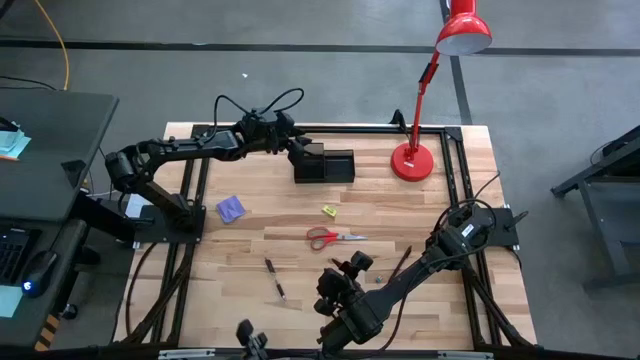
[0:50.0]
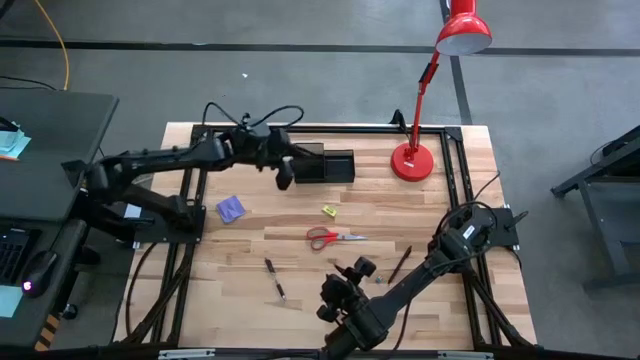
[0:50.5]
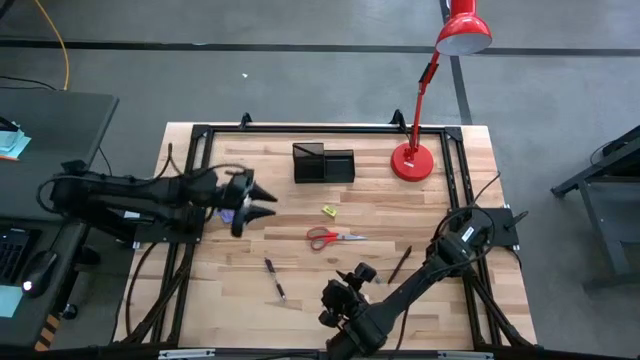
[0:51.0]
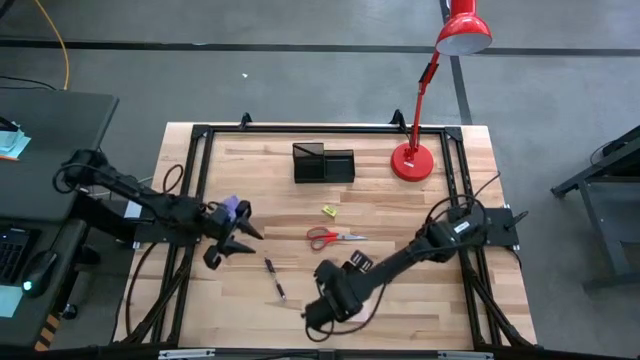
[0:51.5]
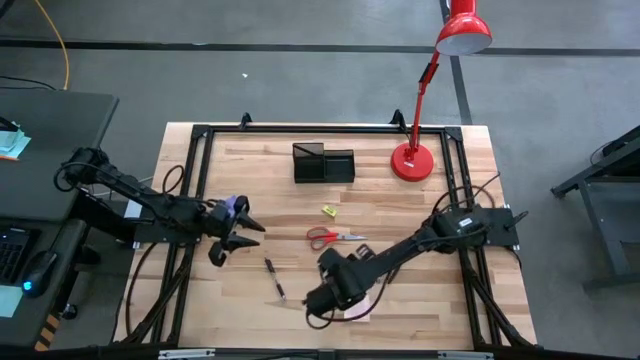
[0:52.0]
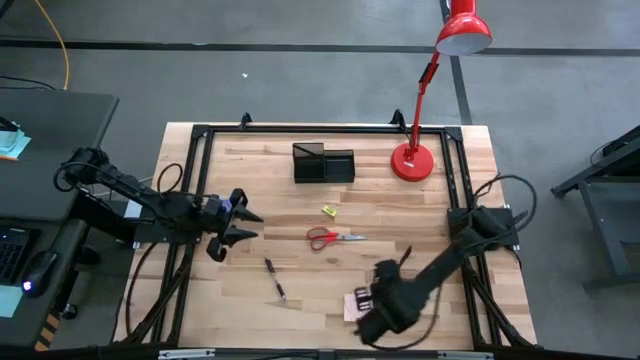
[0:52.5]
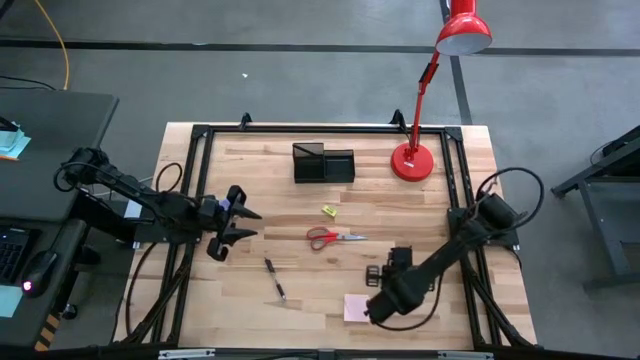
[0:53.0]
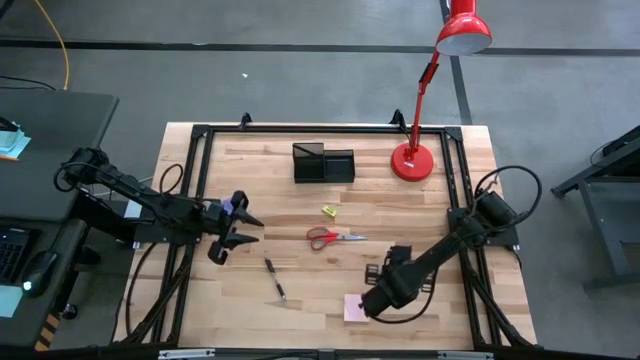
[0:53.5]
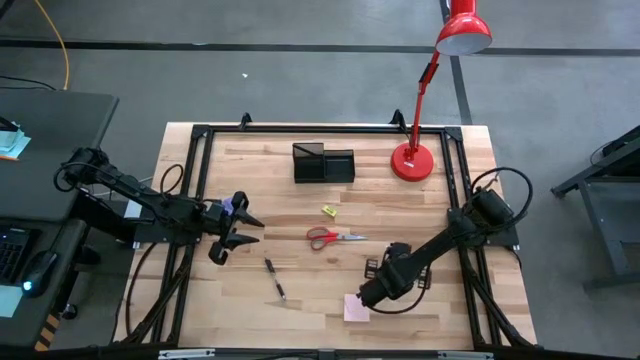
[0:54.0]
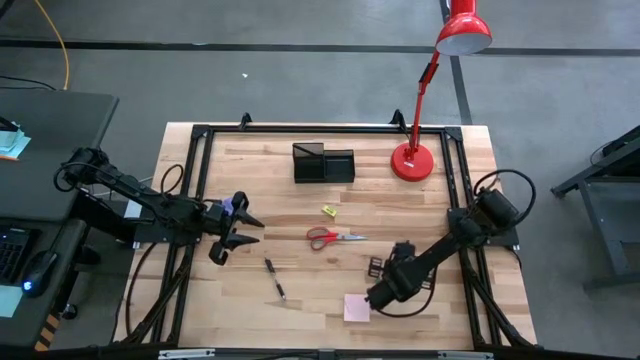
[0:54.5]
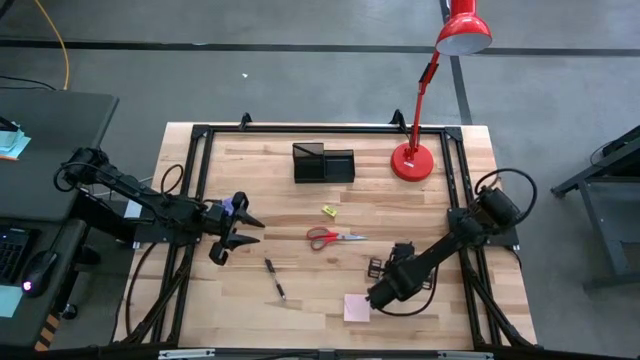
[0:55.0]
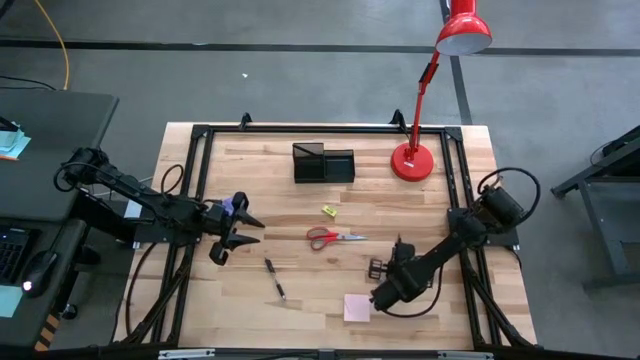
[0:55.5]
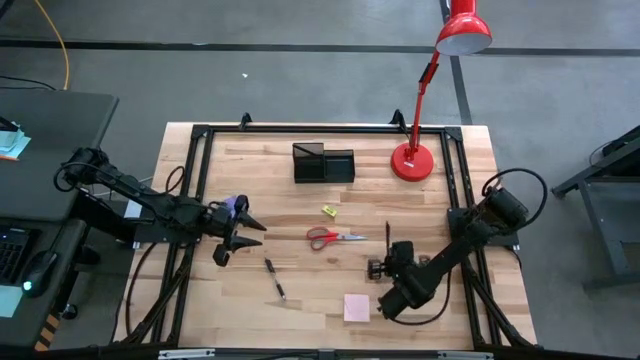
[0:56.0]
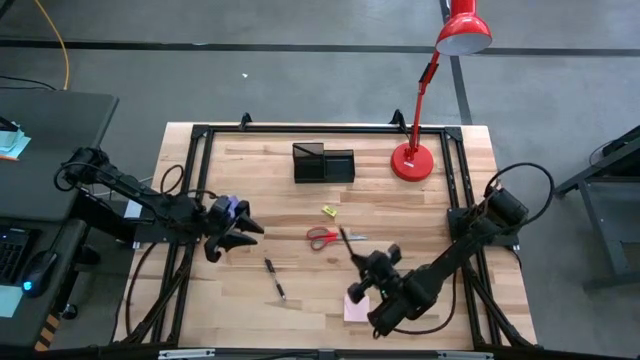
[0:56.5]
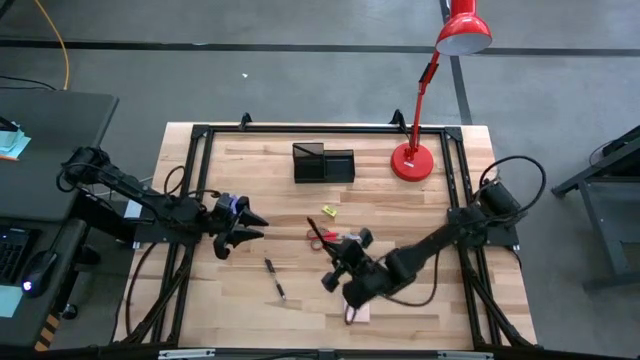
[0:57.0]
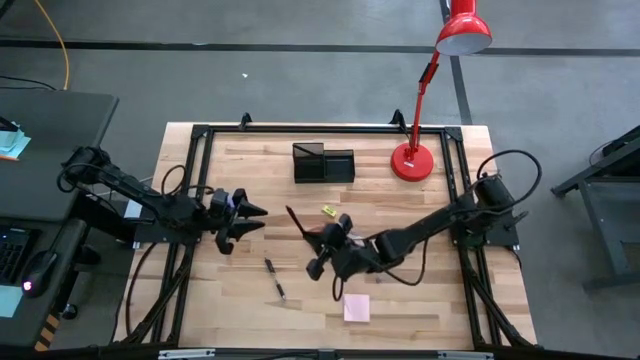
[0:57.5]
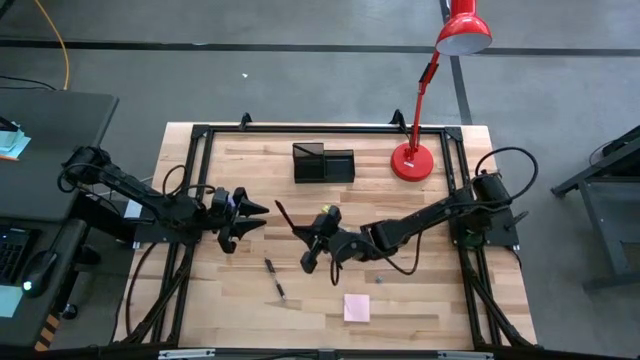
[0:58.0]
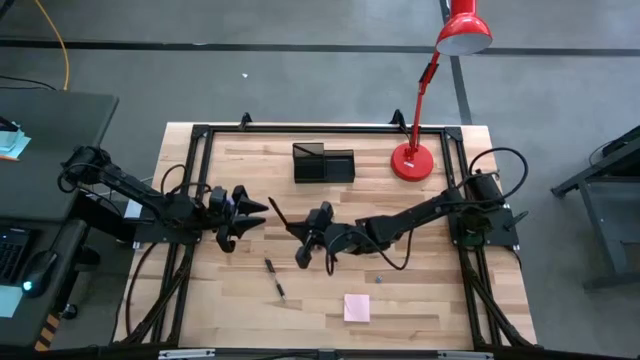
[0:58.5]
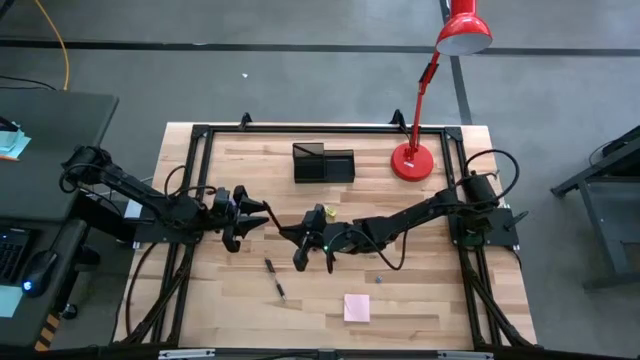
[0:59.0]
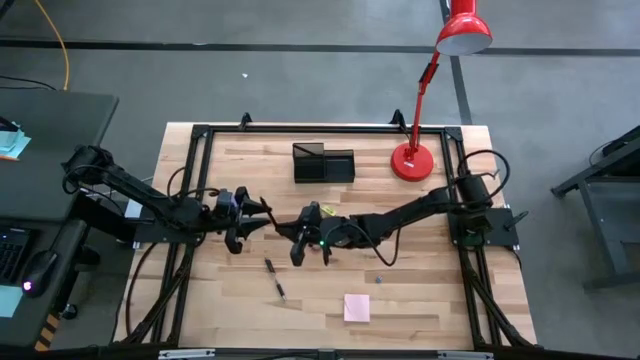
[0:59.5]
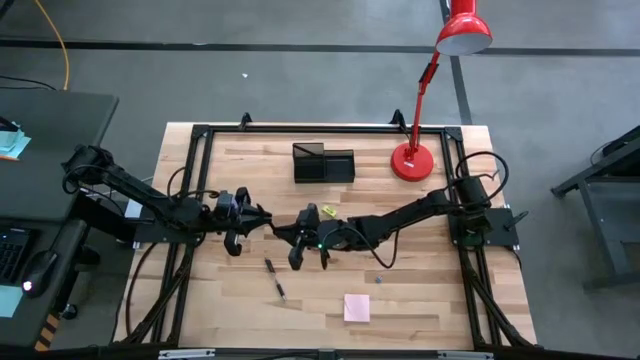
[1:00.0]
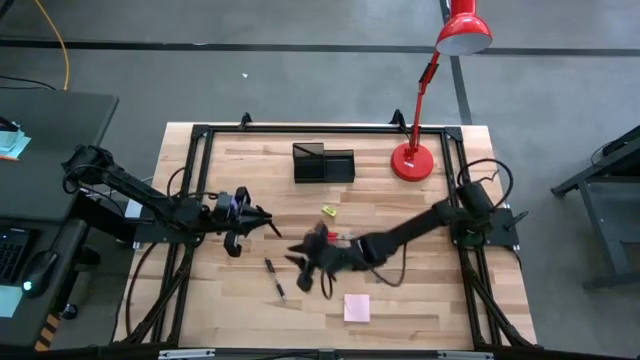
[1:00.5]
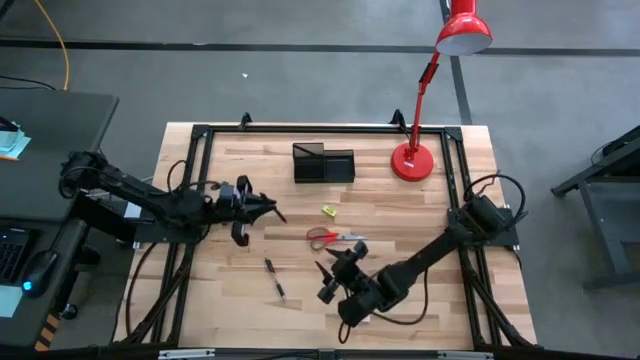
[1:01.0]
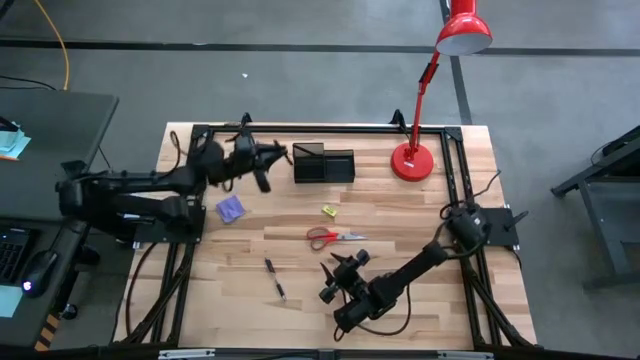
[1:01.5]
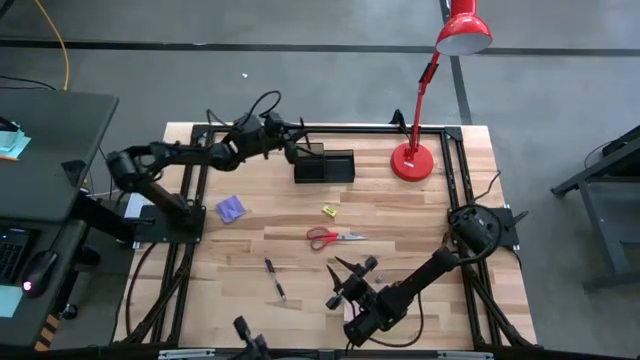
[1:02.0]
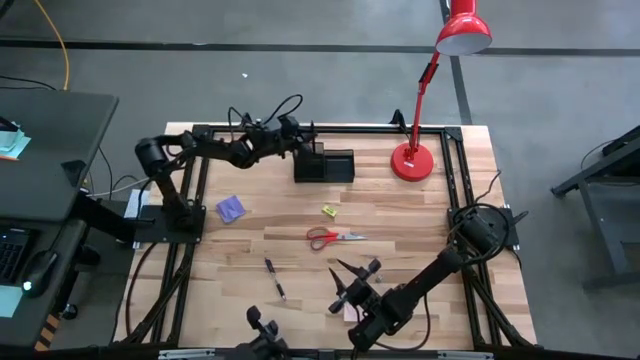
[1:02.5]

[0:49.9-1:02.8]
Task: Pick and place office supplies into organizer
Put the black pen into the desk organizer

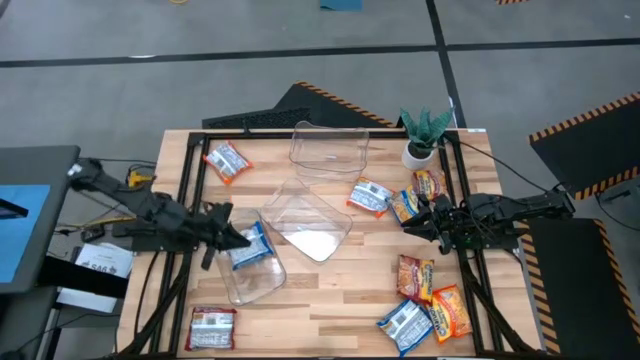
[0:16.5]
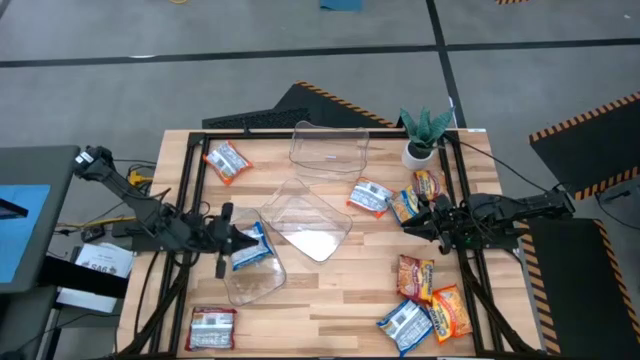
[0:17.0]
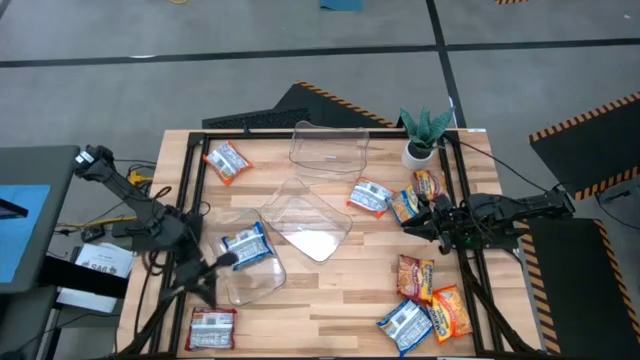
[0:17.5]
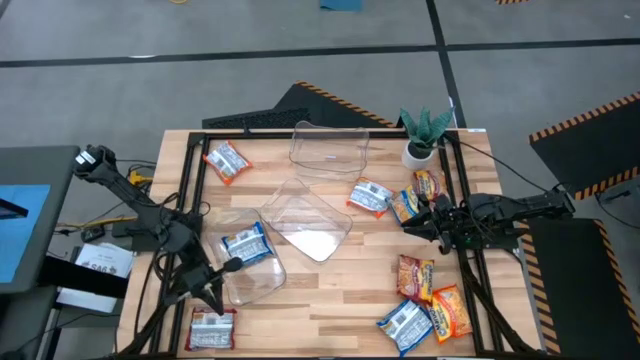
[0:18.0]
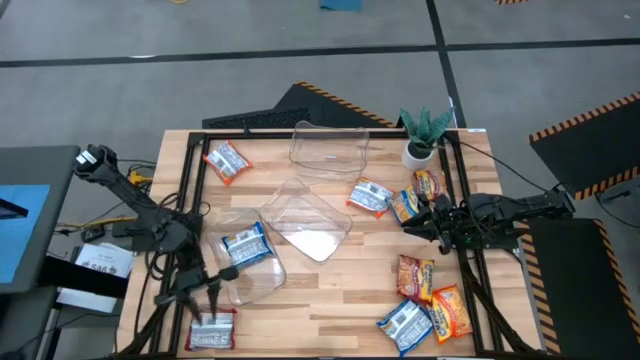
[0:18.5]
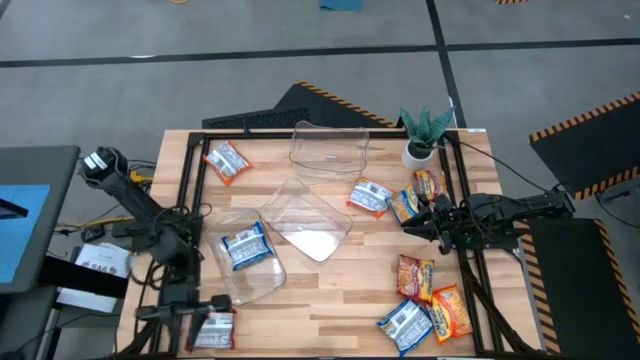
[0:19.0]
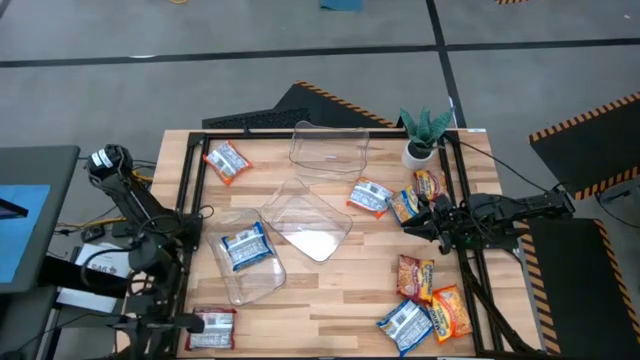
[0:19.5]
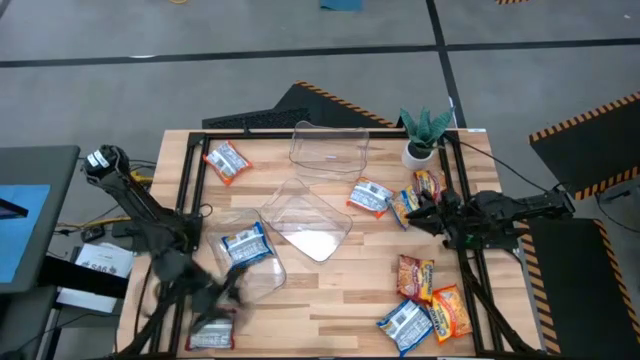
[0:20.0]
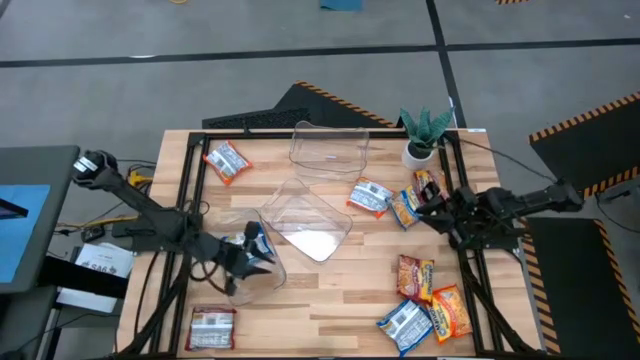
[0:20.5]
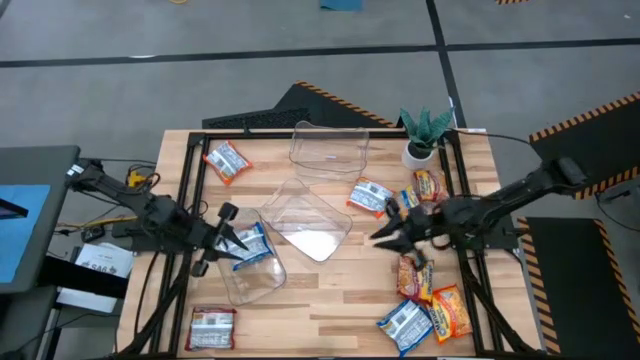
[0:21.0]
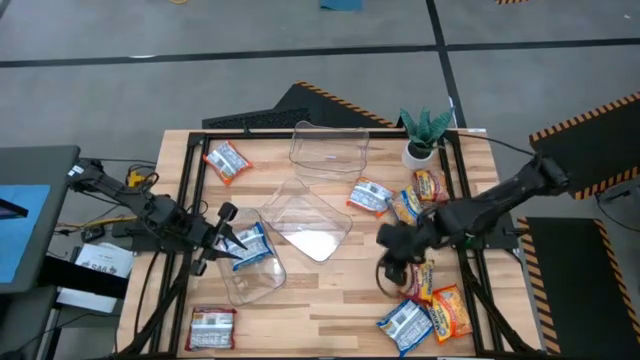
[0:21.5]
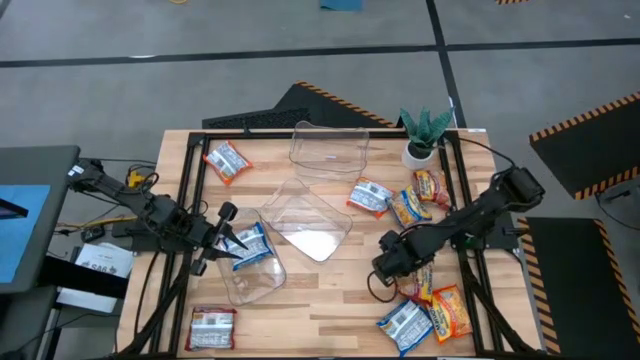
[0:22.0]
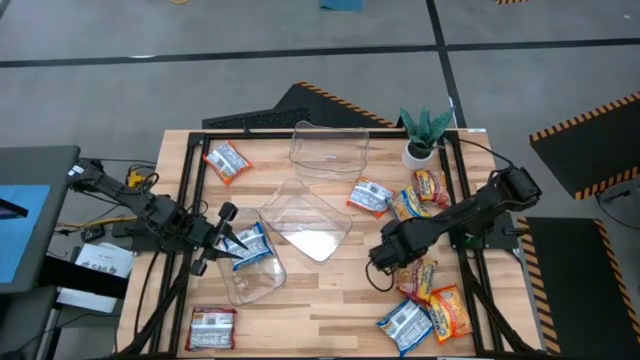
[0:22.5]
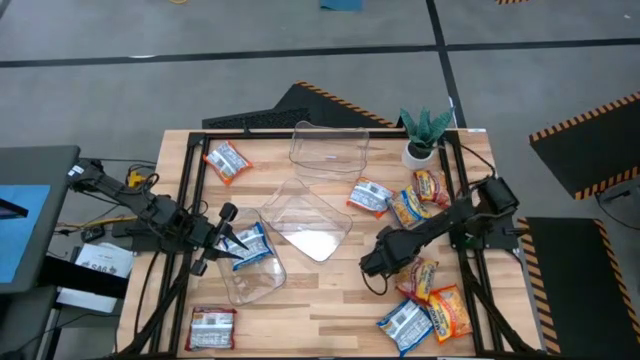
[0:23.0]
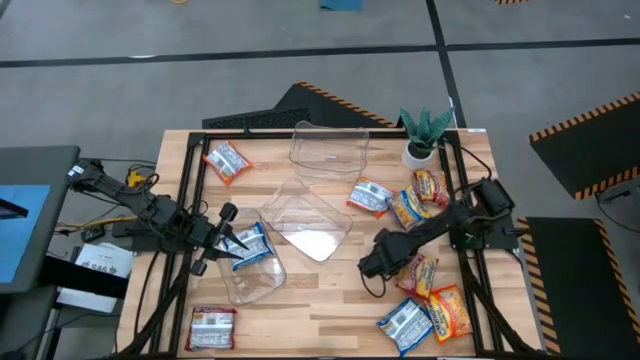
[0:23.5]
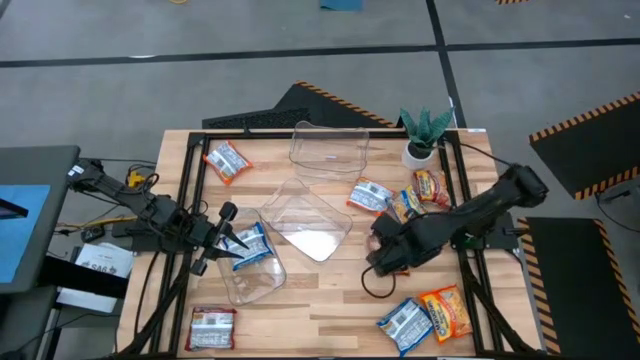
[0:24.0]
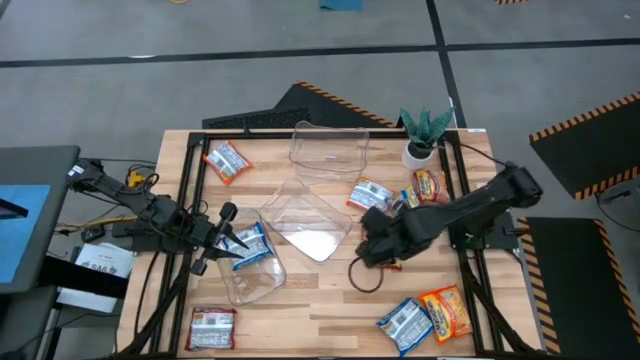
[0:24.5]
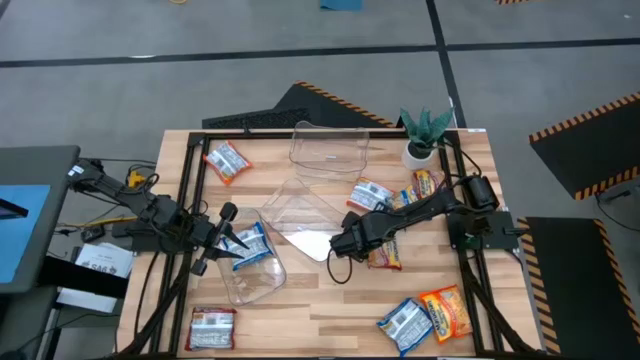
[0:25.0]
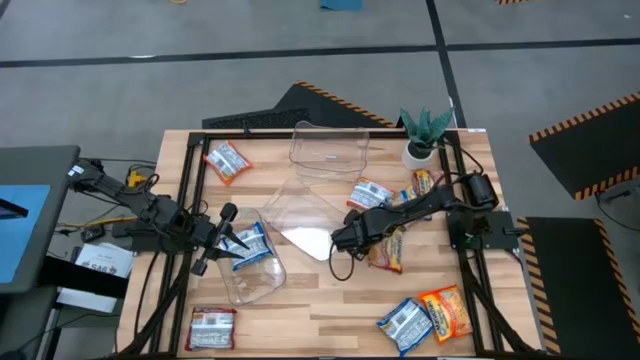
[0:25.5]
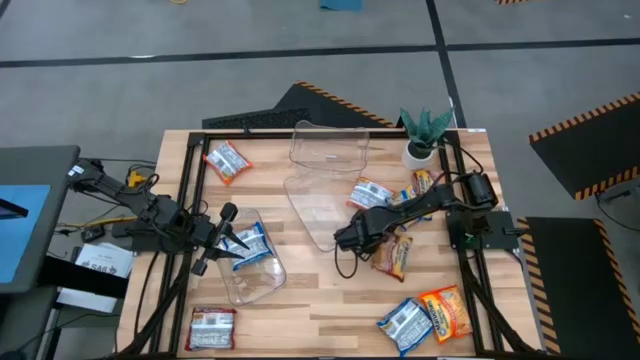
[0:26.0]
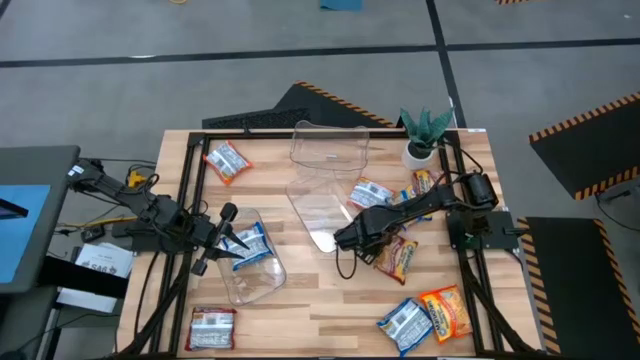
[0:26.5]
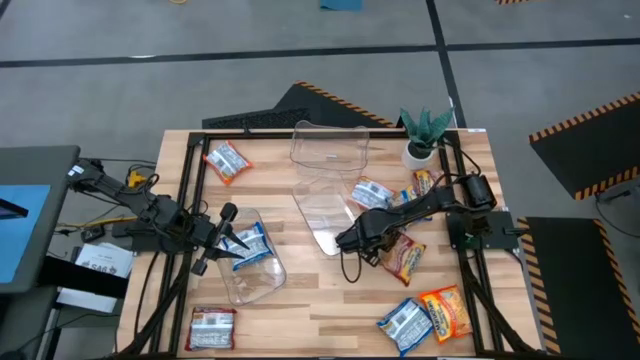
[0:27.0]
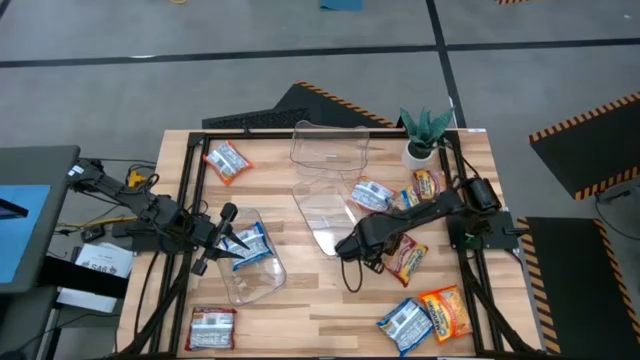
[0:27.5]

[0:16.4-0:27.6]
Task: Sort Maruchan noodles
Put the bottom right red noodle pack into the top transparent bin
